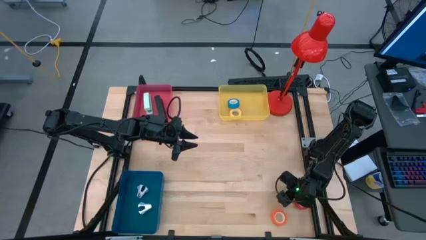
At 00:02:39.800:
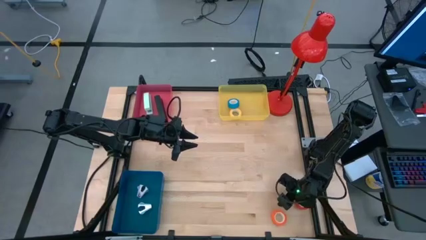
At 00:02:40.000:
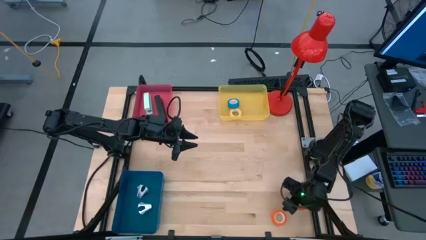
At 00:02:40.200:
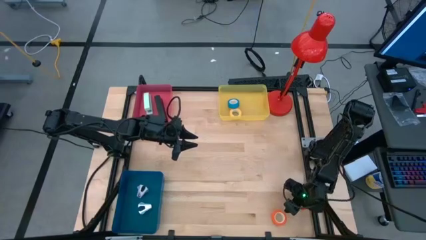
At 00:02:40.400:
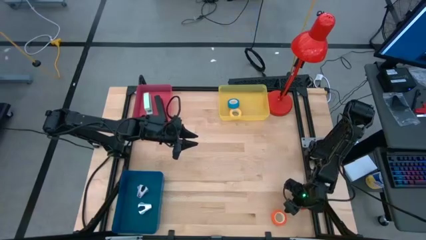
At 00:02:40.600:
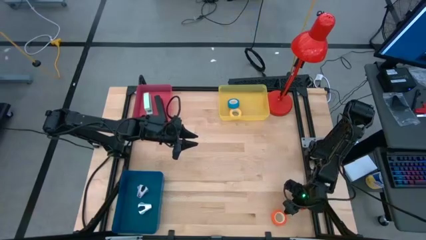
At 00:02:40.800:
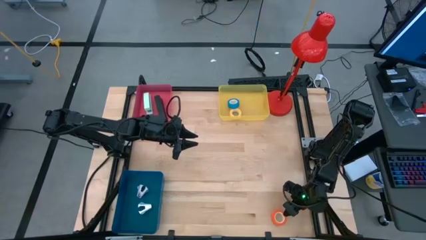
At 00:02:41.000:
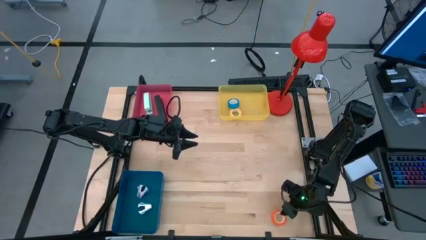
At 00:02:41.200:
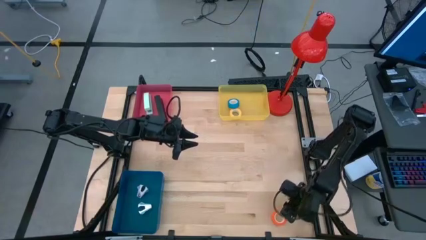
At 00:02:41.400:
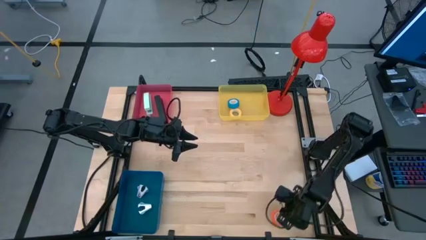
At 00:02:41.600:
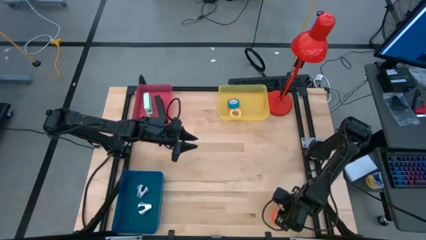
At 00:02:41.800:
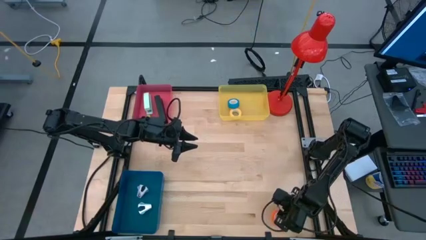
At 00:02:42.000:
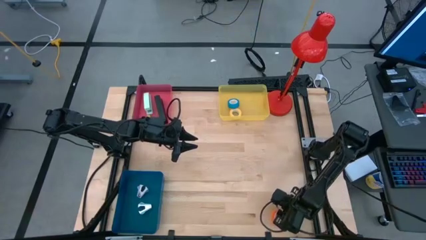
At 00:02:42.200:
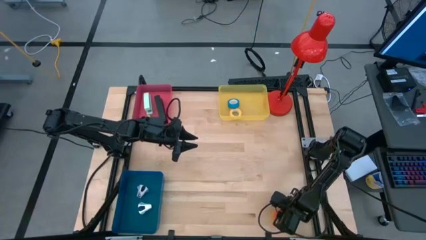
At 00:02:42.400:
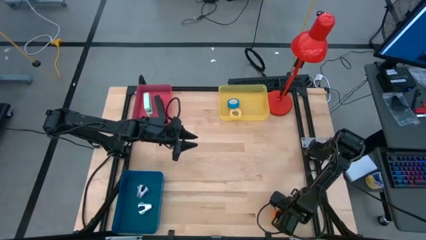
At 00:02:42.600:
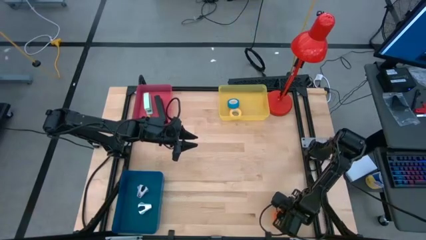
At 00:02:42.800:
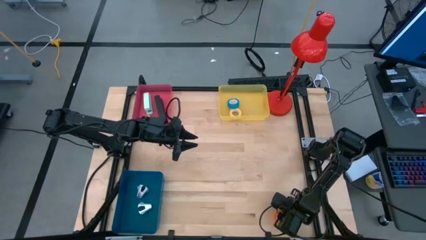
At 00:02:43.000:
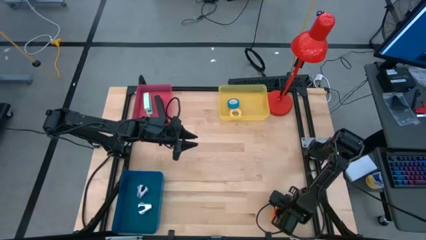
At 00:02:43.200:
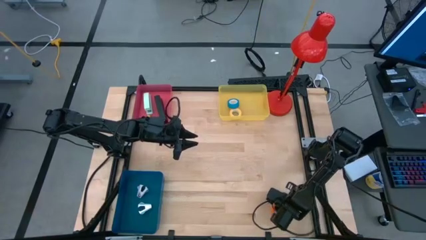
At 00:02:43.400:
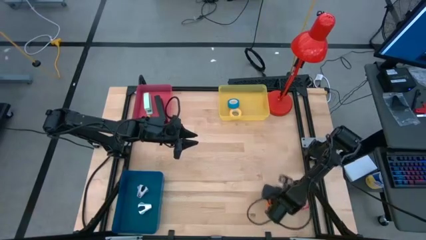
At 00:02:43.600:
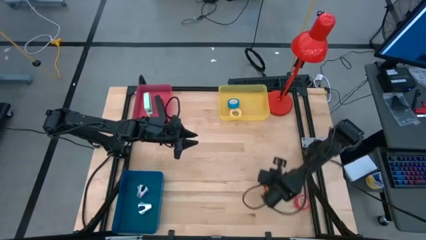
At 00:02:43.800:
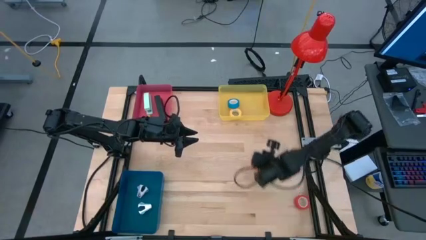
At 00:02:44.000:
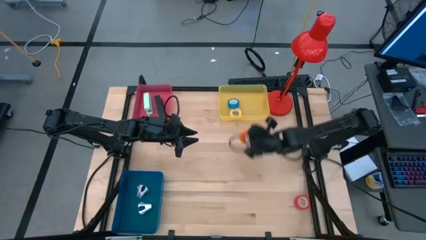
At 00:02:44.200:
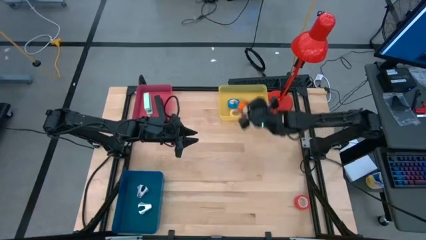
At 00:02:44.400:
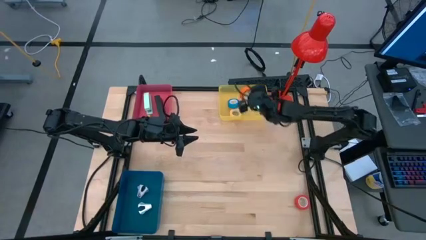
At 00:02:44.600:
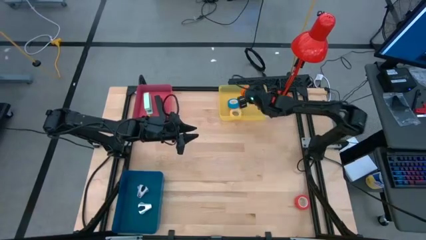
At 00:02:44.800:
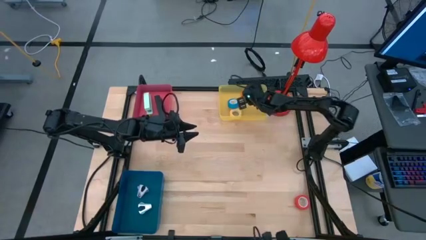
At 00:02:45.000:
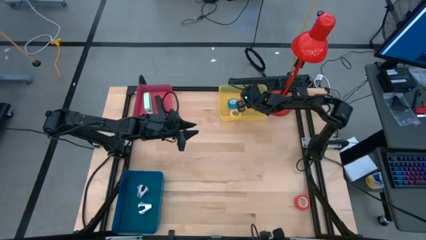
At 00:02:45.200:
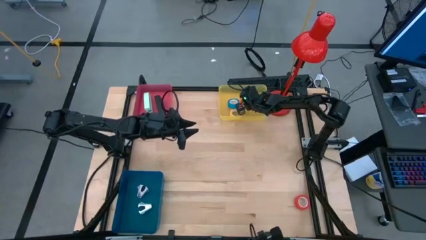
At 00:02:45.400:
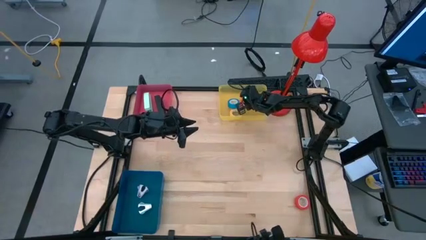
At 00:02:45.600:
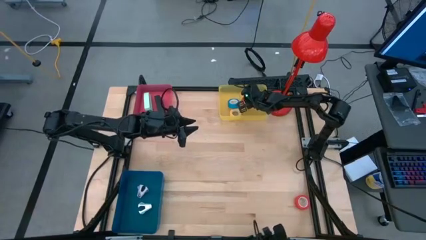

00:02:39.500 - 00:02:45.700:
Task: Pick and place Stapler, Stapler remover, tape
Put the orange tape into the yellow bin

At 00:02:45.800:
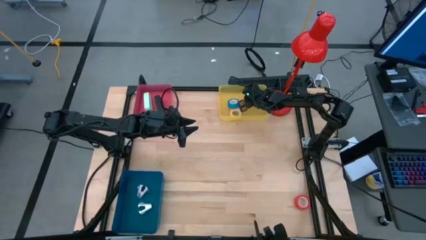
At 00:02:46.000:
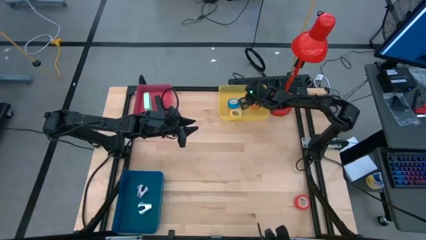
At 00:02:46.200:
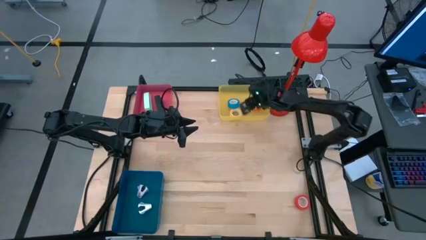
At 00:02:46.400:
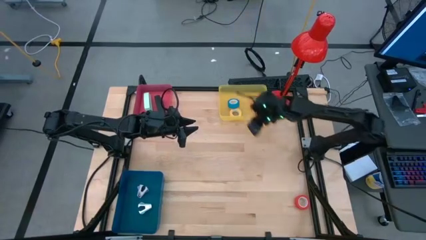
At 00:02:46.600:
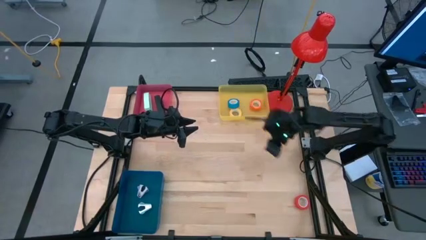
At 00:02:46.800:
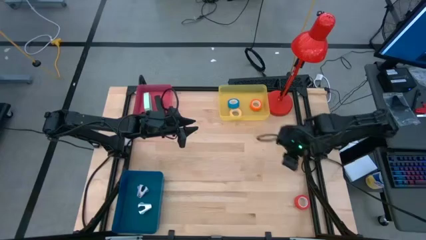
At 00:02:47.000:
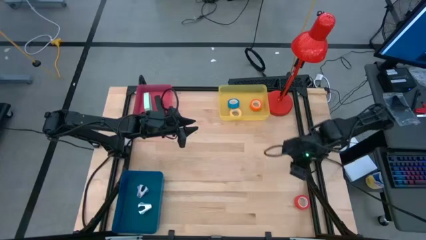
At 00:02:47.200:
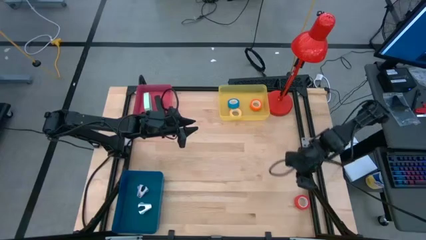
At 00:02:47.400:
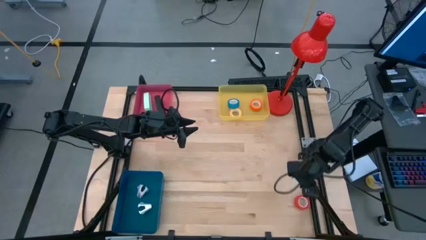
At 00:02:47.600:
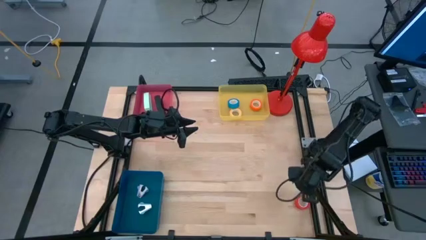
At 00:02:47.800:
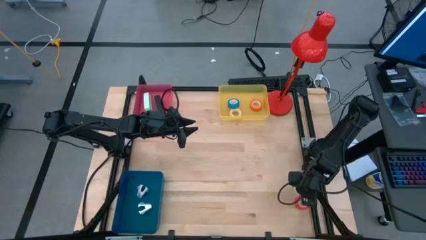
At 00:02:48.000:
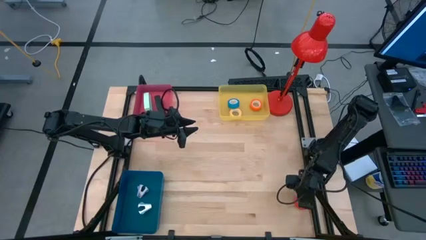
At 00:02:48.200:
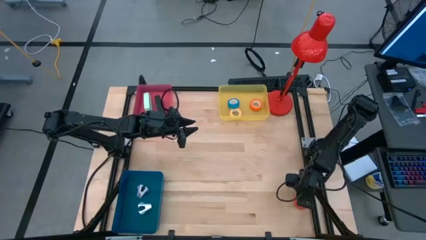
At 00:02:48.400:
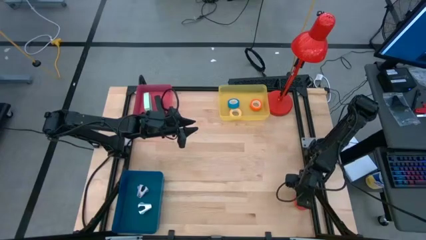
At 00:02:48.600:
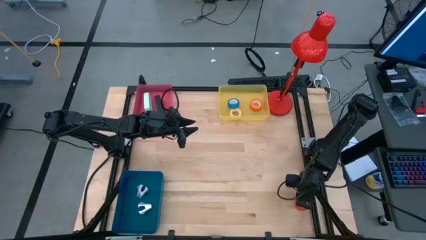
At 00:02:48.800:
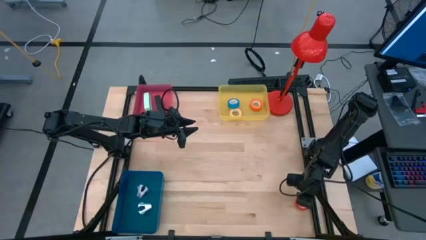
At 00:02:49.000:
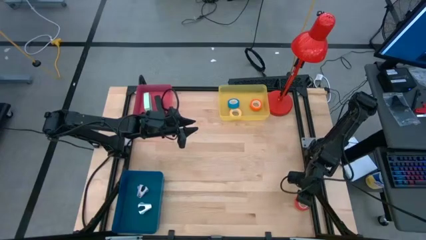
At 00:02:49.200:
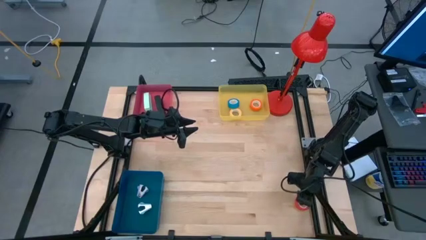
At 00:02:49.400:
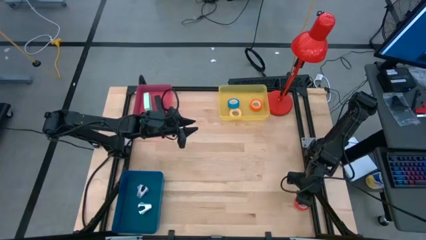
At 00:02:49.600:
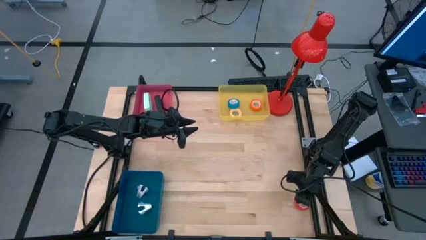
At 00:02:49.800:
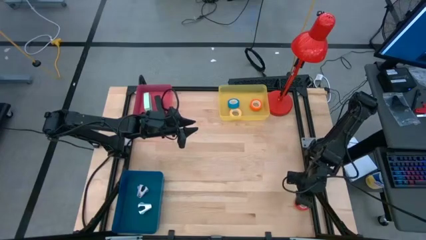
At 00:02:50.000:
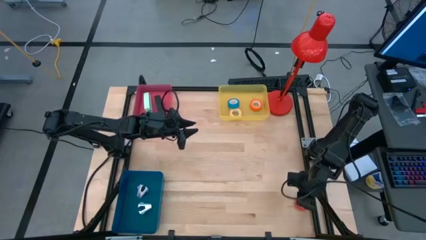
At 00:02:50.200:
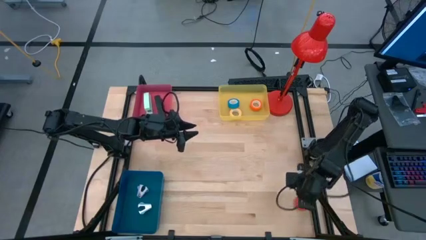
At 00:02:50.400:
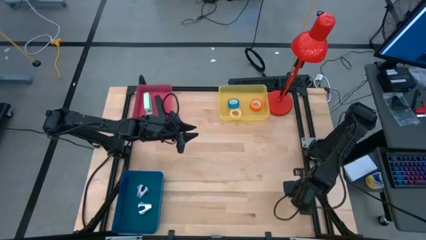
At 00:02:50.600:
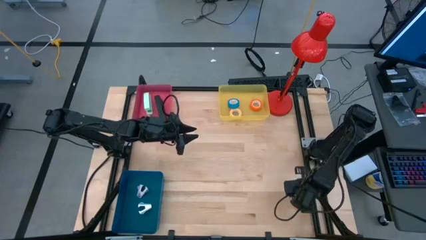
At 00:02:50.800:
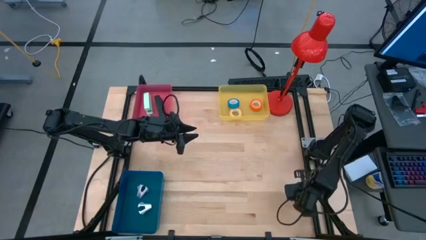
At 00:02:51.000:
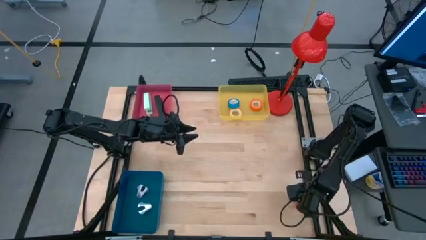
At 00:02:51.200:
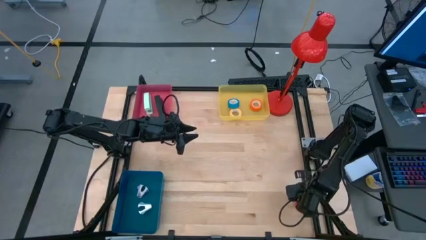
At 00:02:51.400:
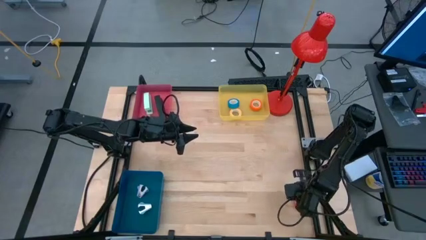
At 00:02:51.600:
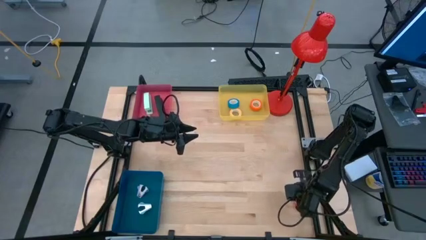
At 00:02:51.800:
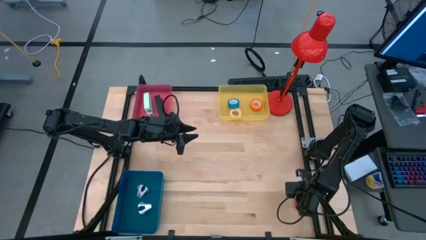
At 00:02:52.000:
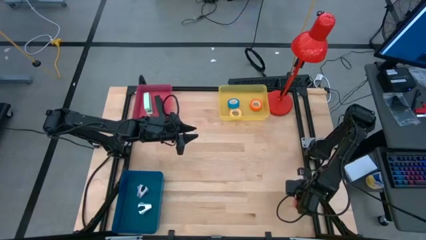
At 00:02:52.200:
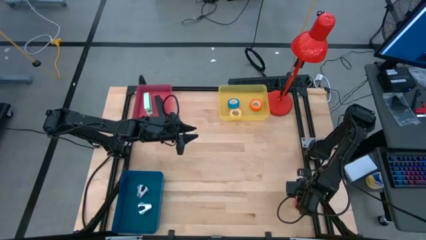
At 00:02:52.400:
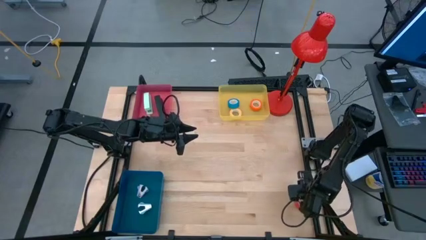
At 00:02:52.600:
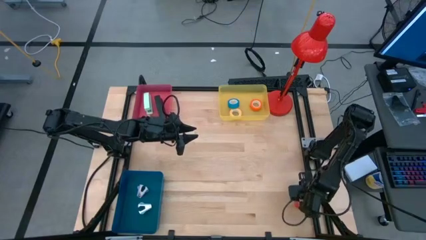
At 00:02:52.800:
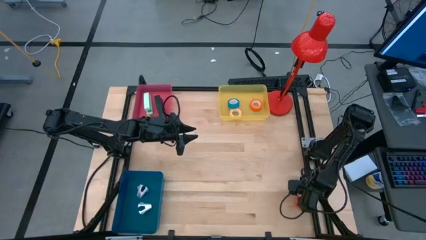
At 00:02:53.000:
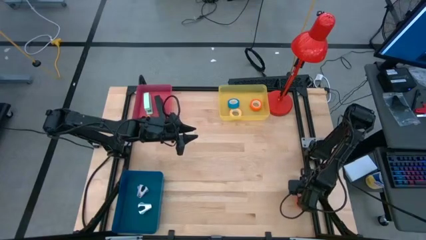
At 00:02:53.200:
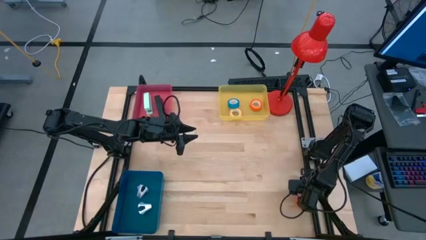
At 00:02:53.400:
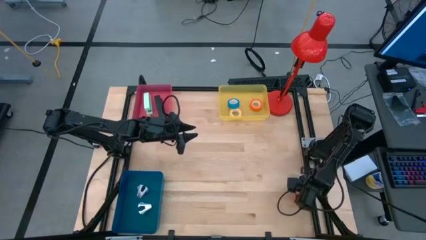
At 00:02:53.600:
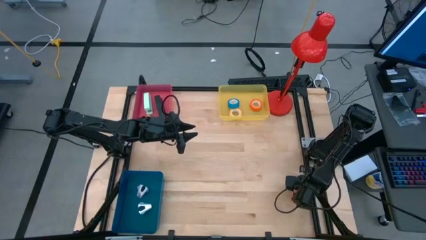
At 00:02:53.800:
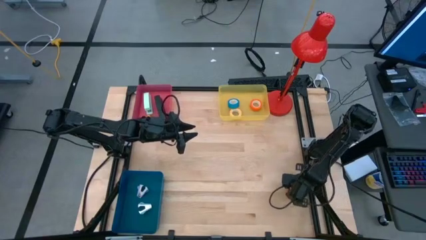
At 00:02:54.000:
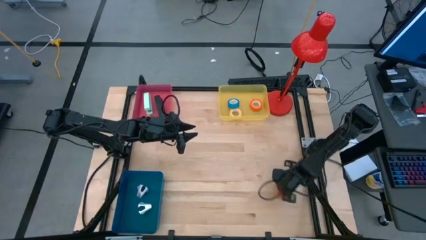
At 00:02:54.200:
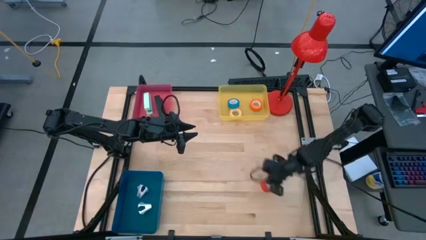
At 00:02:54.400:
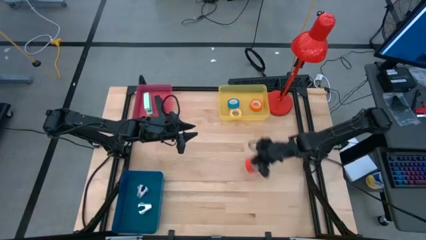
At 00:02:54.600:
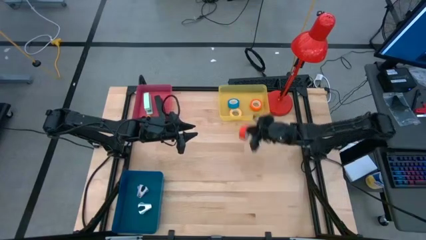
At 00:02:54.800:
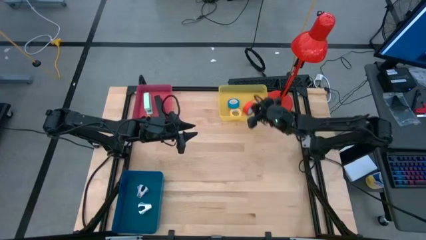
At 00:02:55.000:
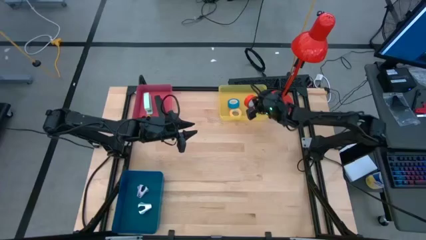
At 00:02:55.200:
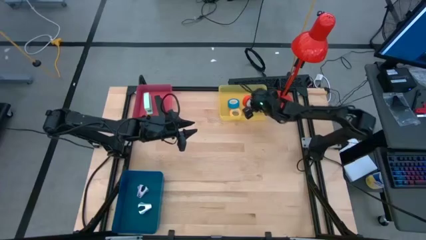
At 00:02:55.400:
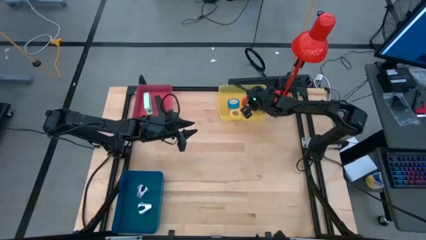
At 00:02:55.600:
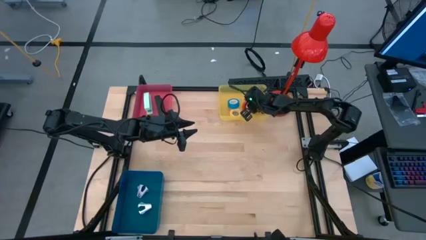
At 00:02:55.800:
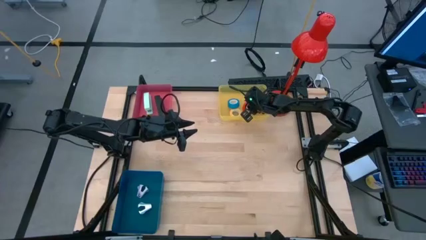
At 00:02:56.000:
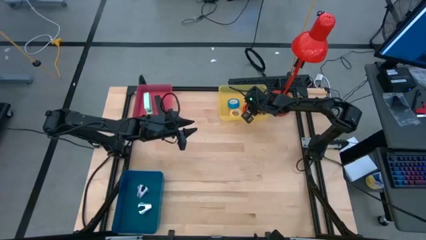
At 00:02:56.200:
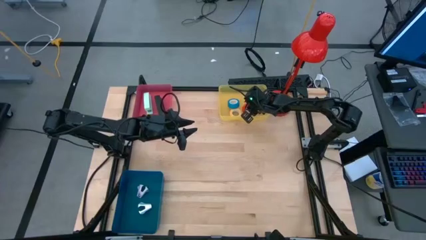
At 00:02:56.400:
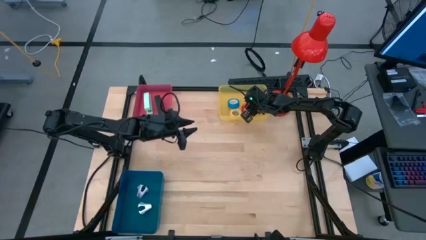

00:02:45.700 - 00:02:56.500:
Put the red tape into the yellow bin
